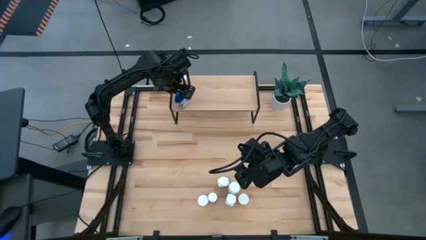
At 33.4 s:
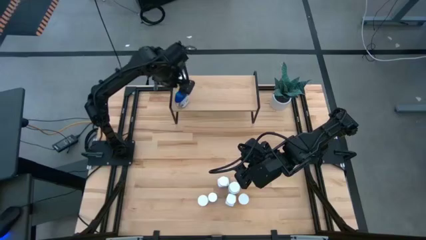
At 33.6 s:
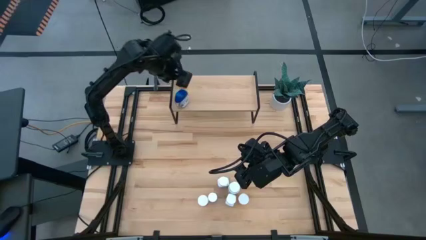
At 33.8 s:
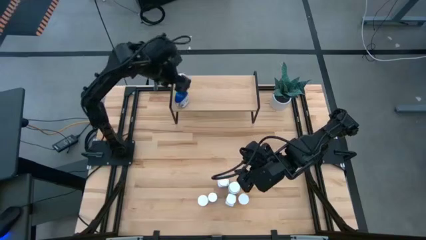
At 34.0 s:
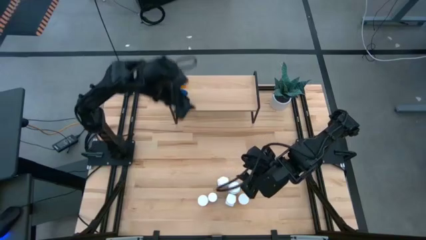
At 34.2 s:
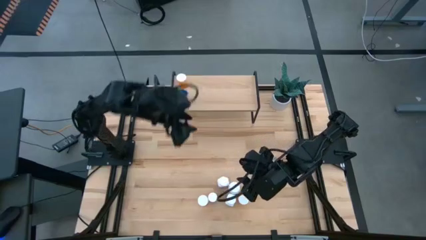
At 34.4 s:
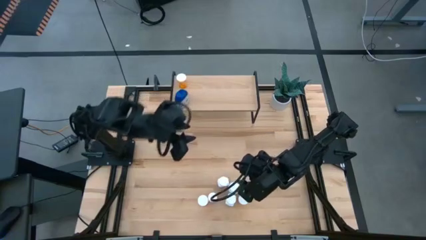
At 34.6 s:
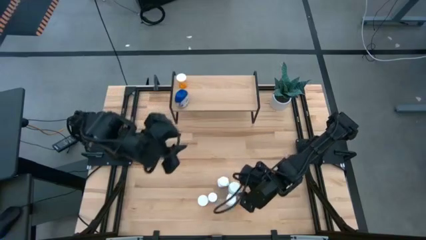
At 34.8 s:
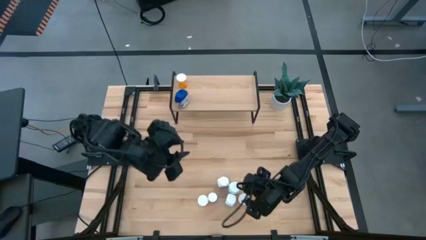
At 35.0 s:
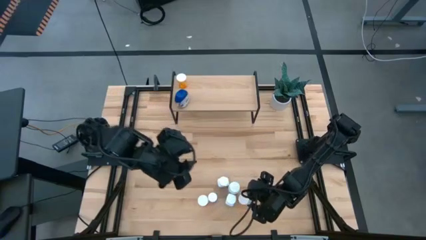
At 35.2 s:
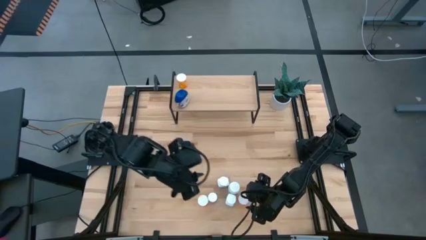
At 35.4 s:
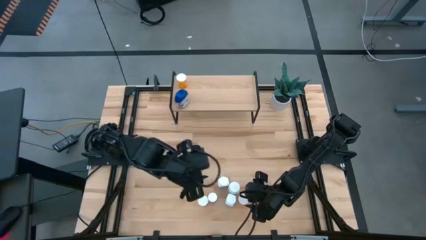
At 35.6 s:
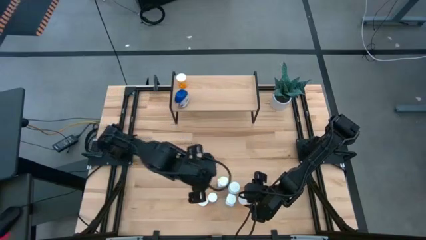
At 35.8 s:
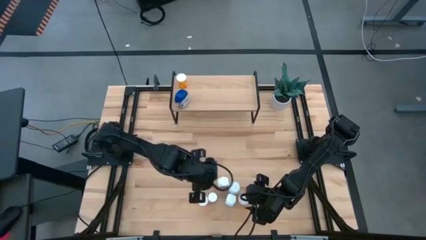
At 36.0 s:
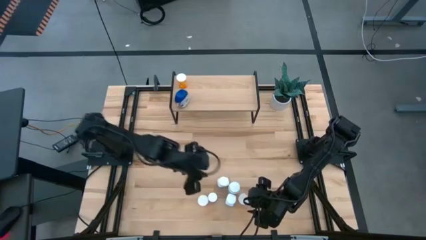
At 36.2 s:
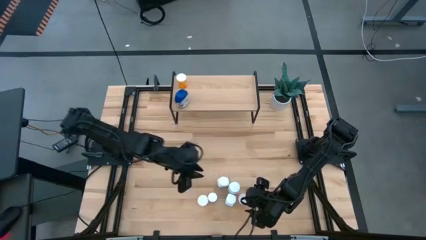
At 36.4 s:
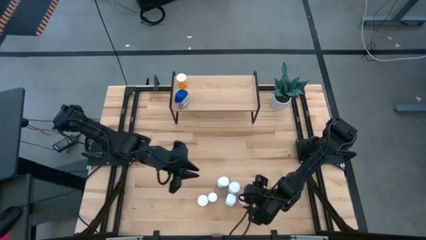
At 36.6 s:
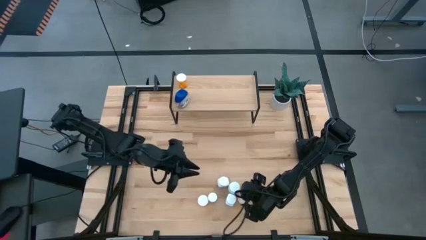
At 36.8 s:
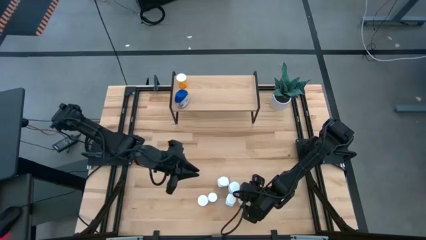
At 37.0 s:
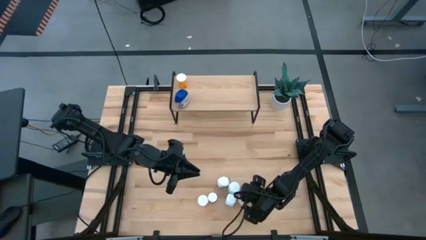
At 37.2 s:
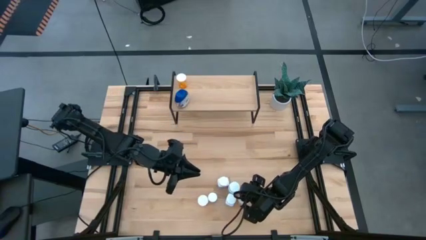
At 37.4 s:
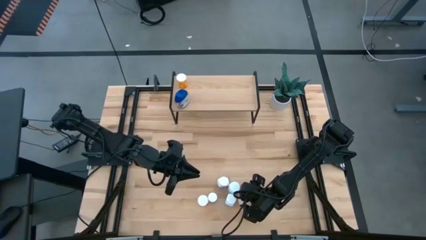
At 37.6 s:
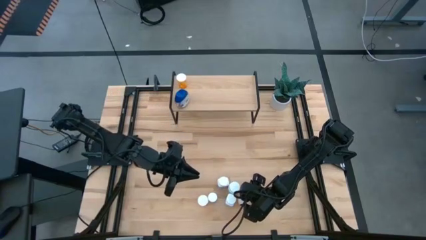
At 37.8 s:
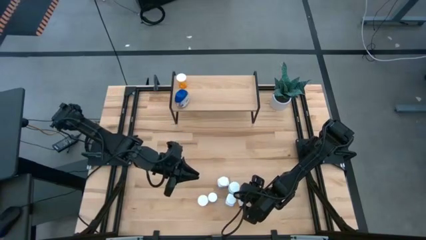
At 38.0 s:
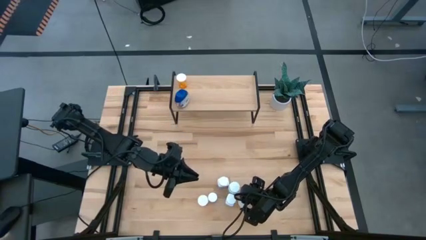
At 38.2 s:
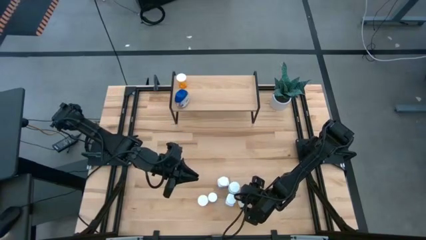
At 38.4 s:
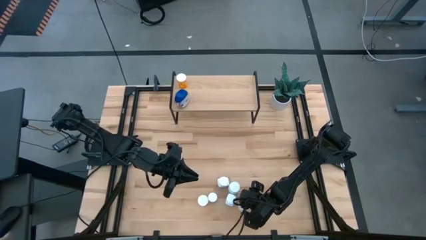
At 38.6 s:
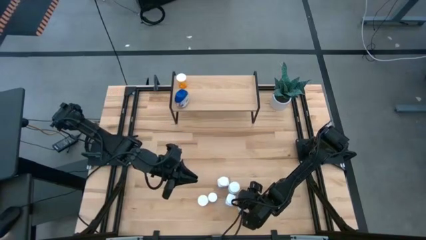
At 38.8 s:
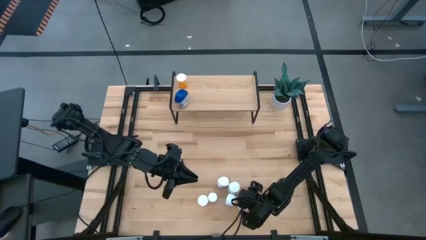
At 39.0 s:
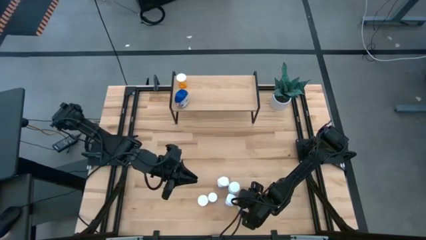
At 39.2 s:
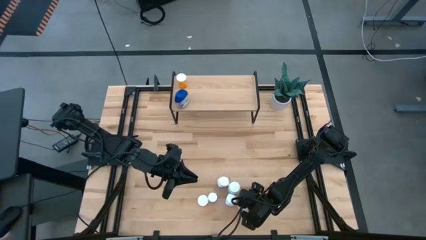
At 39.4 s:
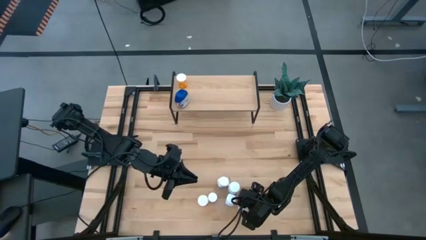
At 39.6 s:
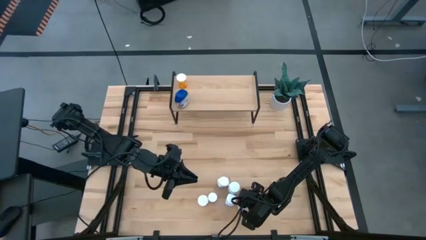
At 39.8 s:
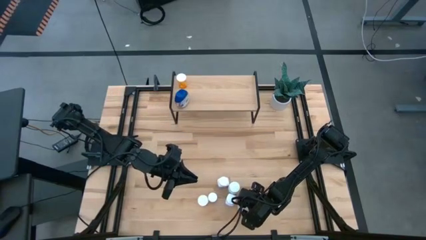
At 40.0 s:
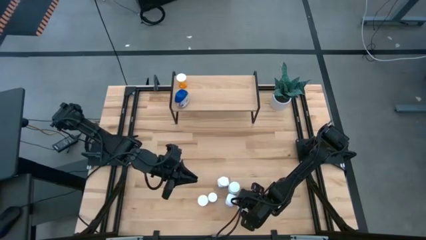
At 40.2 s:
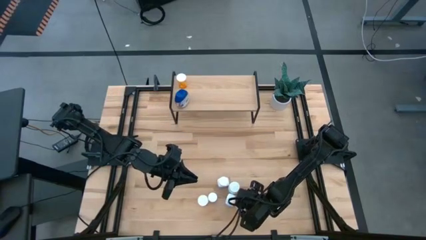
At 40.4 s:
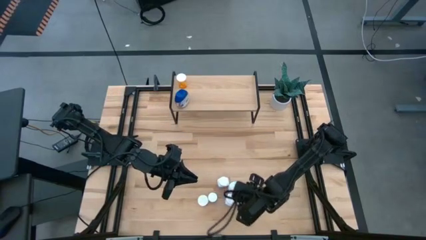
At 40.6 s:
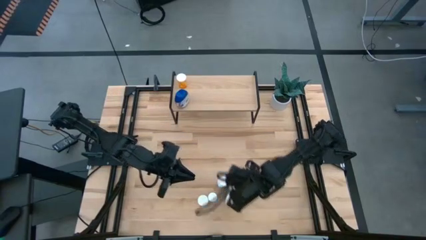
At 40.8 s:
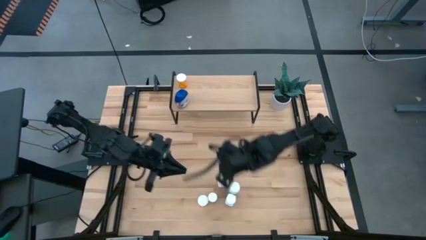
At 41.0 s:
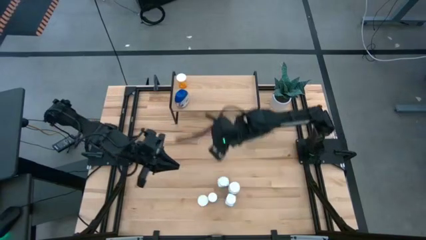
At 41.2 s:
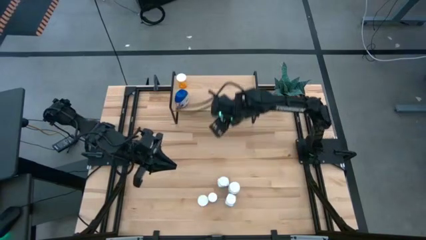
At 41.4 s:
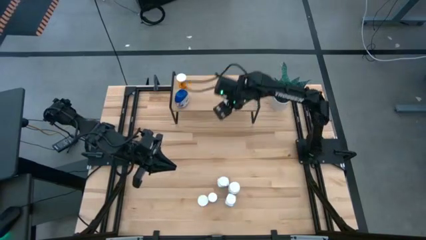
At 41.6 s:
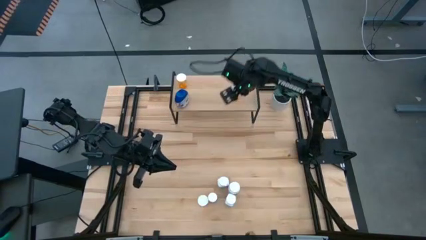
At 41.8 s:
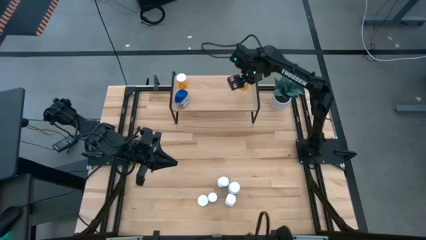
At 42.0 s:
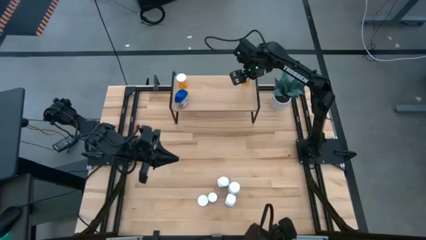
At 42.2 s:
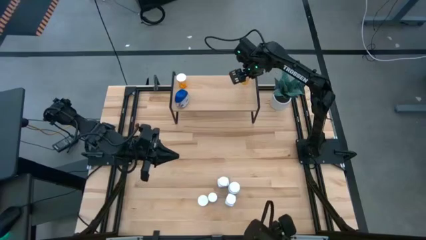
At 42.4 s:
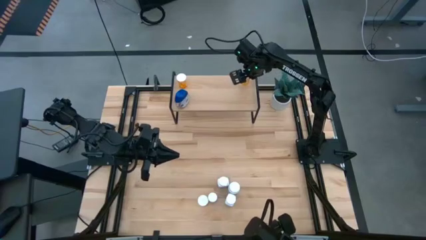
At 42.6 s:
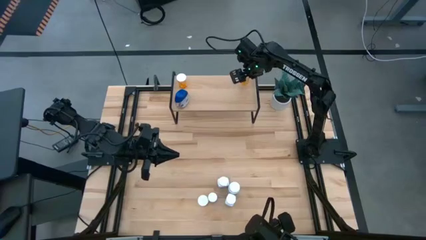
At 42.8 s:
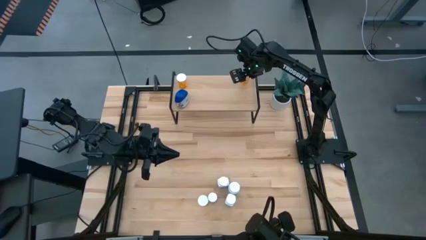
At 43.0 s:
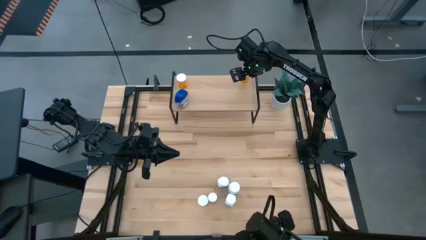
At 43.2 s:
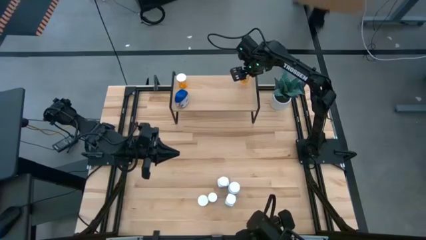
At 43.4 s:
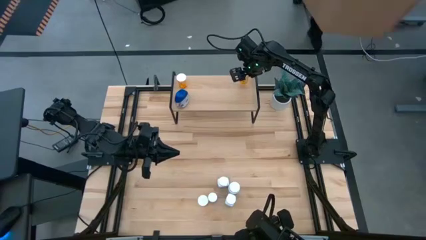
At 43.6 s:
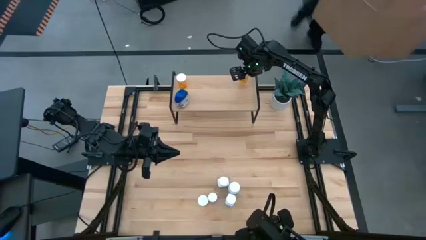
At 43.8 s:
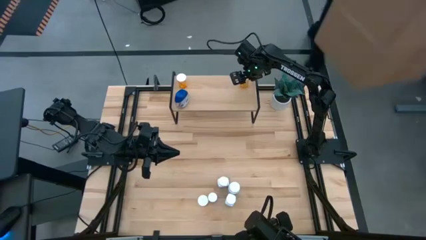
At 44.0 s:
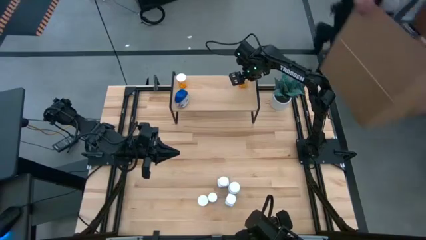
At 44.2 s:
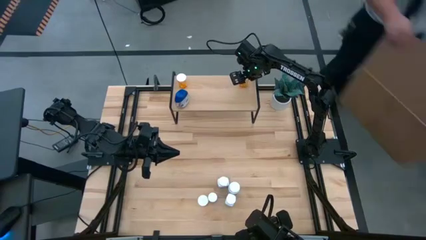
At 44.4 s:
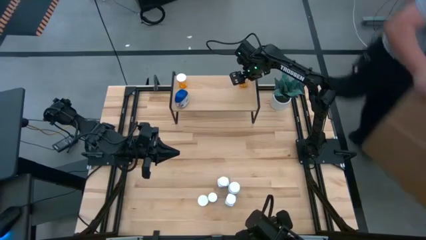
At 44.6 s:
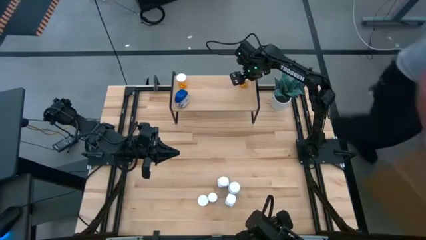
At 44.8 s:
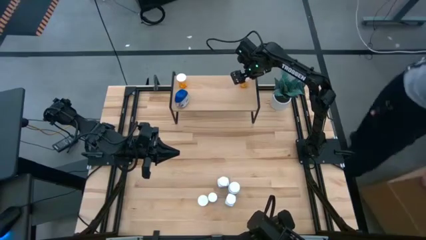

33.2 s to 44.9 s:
Task: Pick and place medicine bottles onto shelf by color
Put the right orange bottle on the shelf
